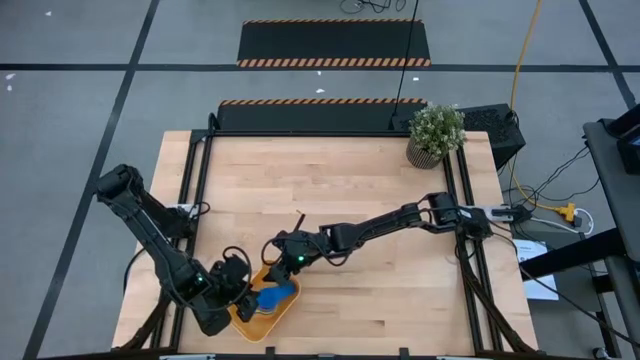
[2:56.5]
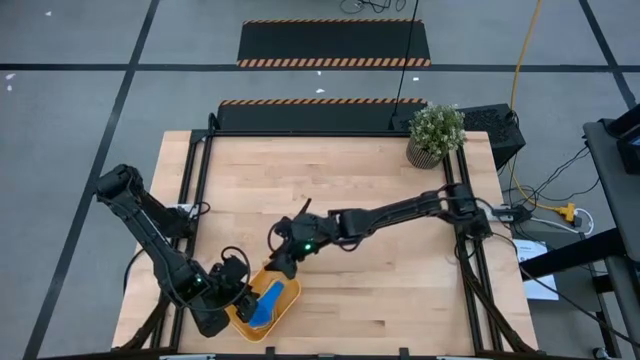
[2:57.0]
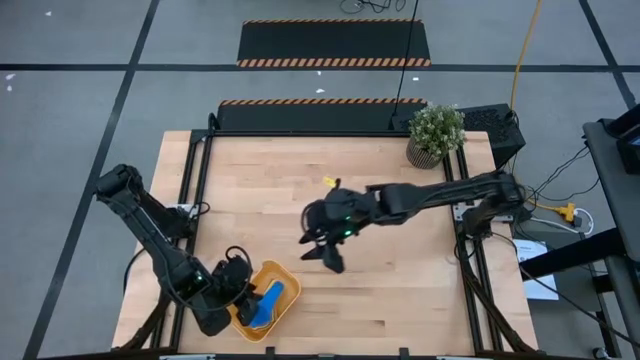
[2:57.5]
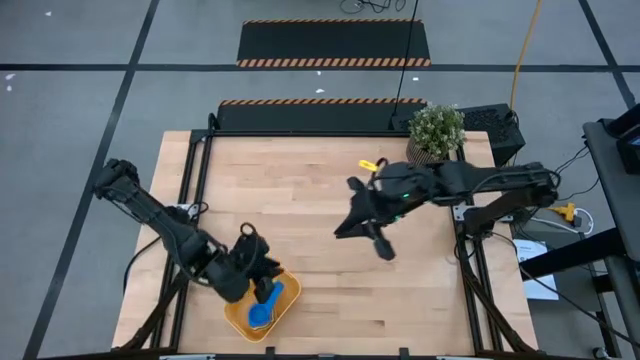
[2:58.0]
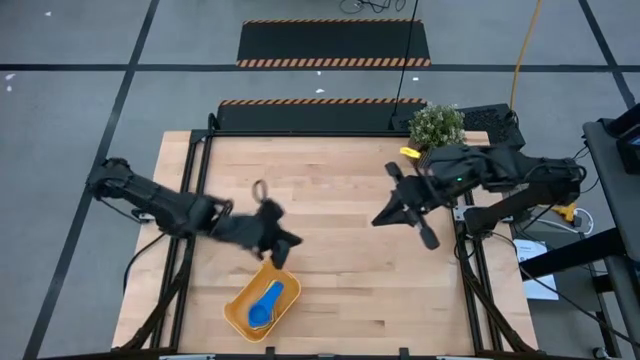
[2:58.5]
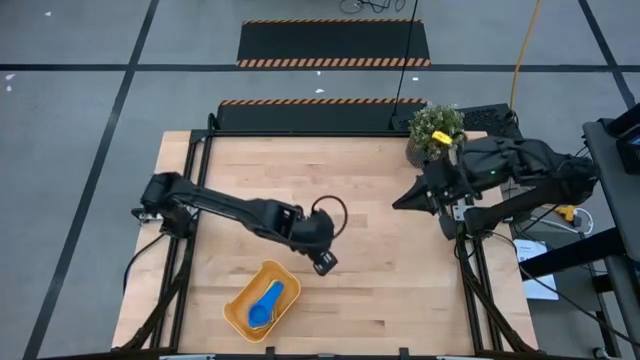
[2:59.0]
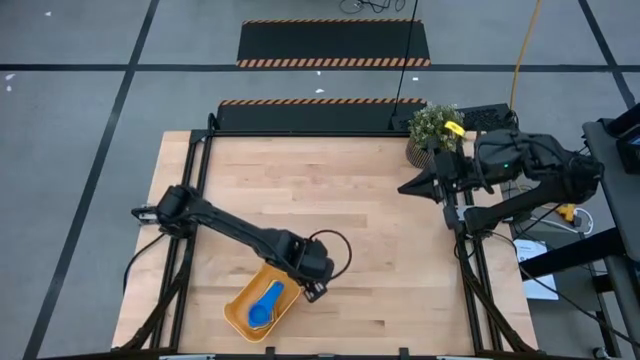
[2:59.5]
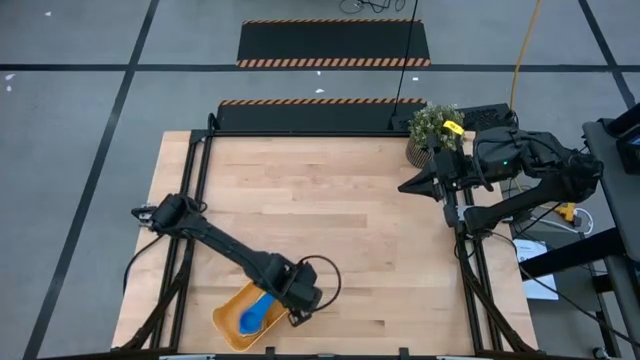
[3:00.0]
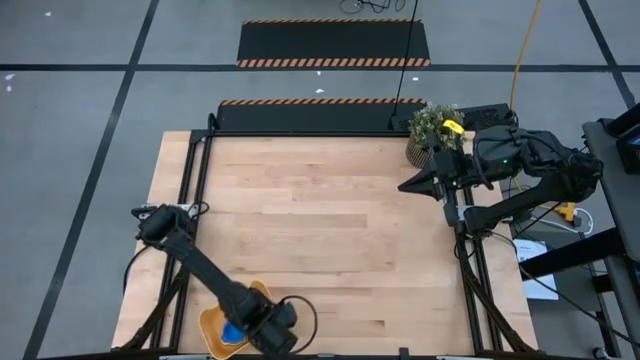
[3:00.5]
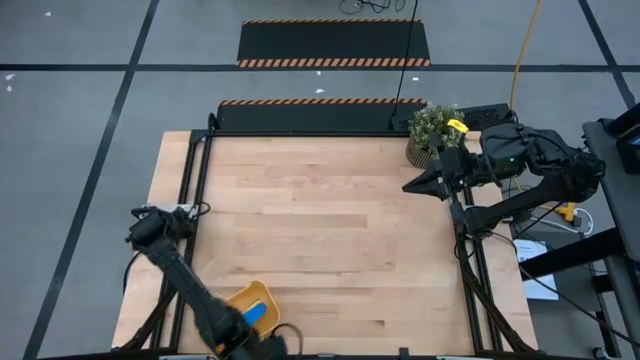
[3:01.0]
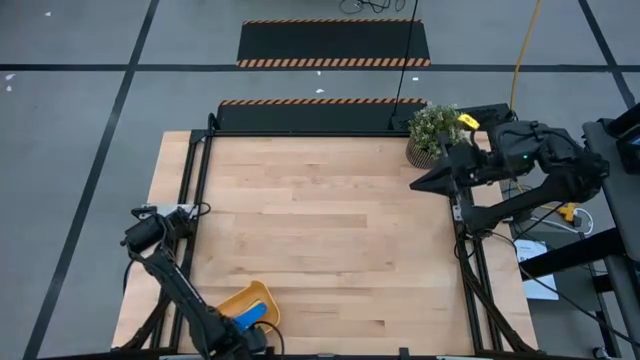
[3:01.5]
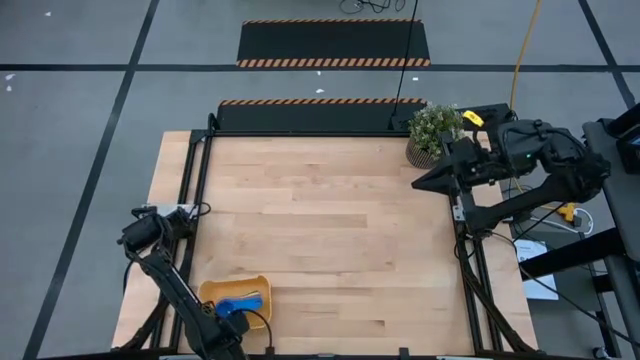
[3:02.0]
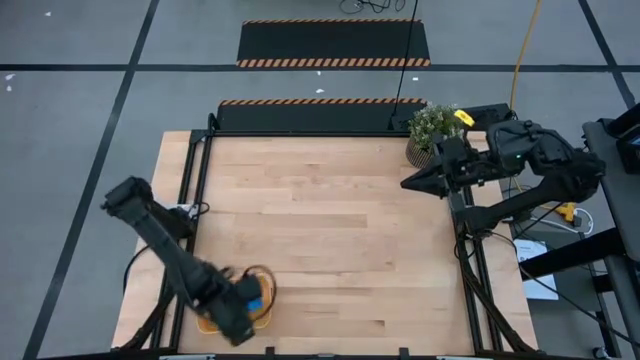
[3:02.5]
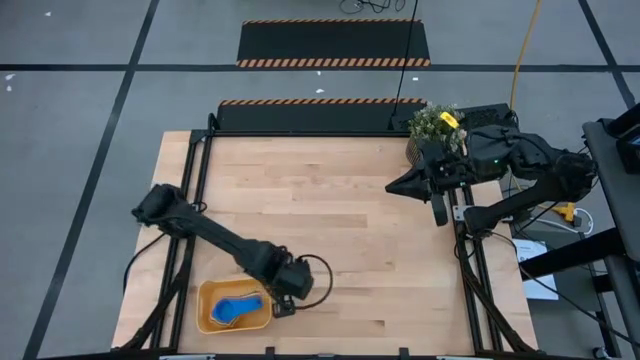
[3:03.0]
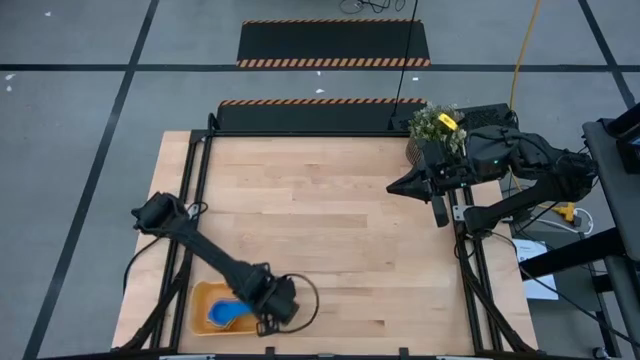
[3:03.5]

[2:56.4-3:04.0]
Task: Nest measuring cups in basket
Move the yellow bin to the bottom left of the table

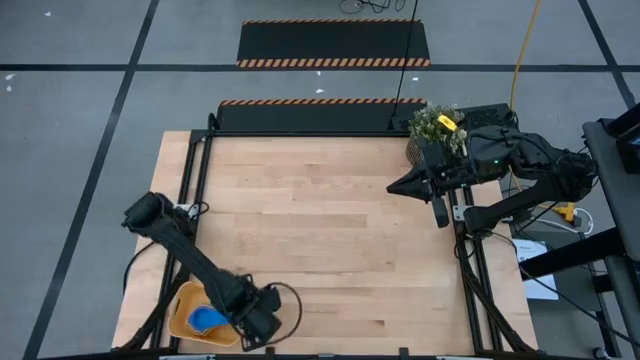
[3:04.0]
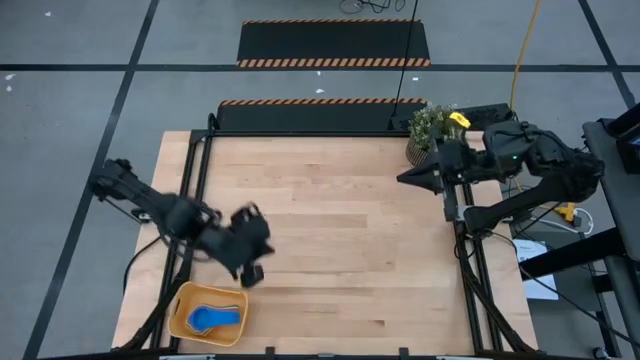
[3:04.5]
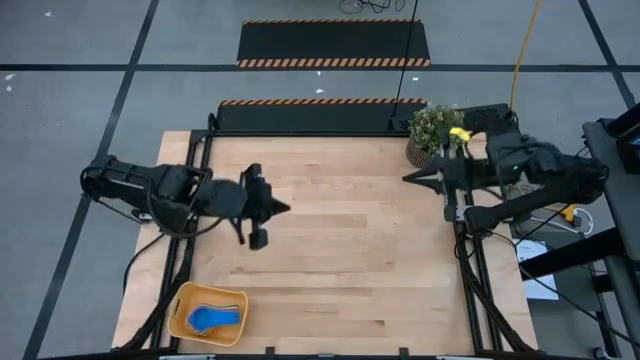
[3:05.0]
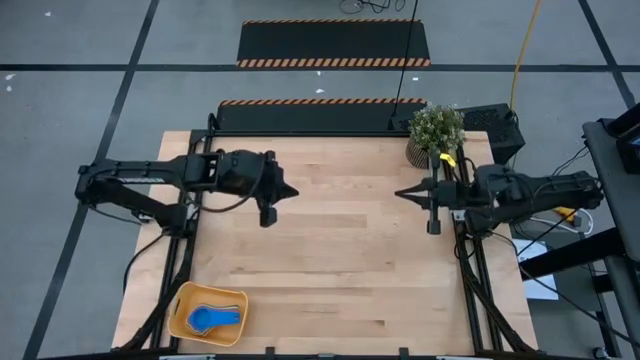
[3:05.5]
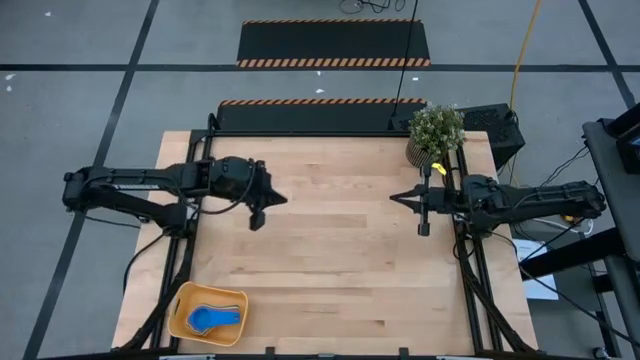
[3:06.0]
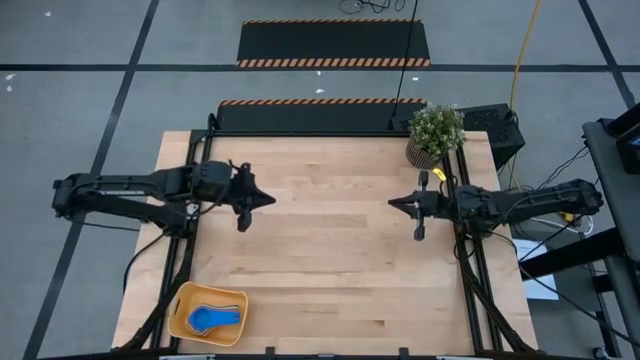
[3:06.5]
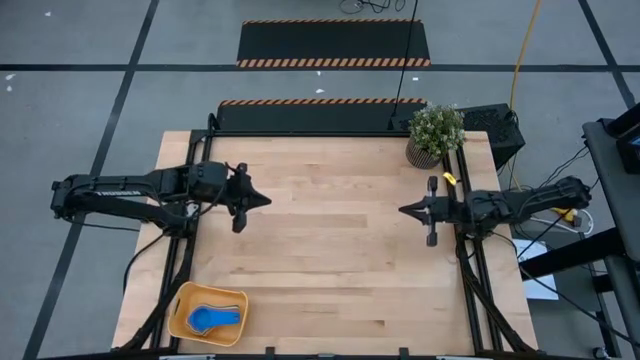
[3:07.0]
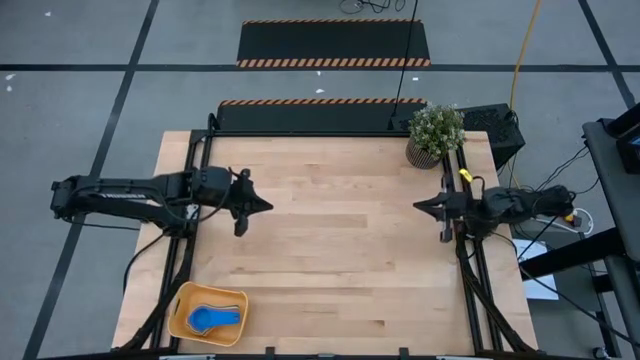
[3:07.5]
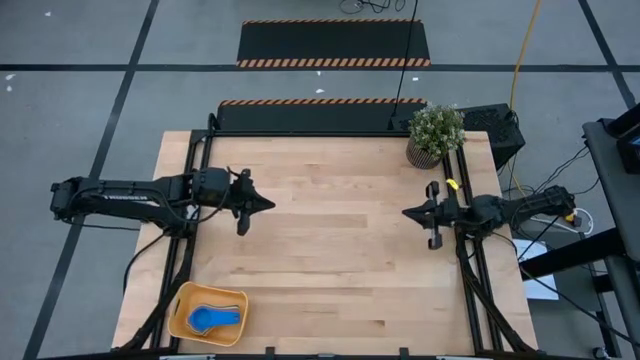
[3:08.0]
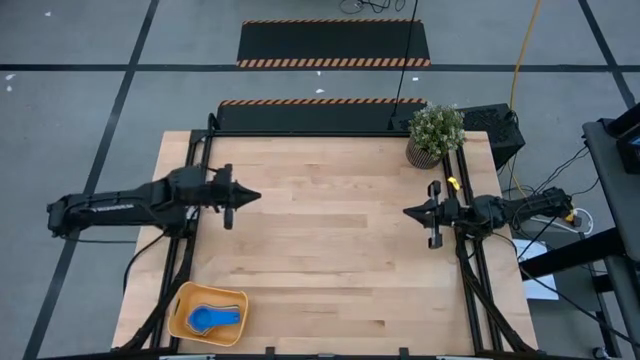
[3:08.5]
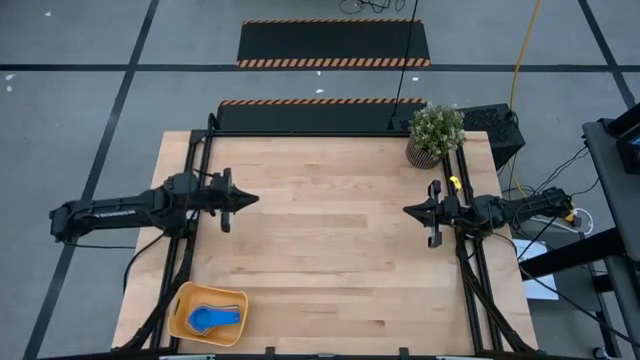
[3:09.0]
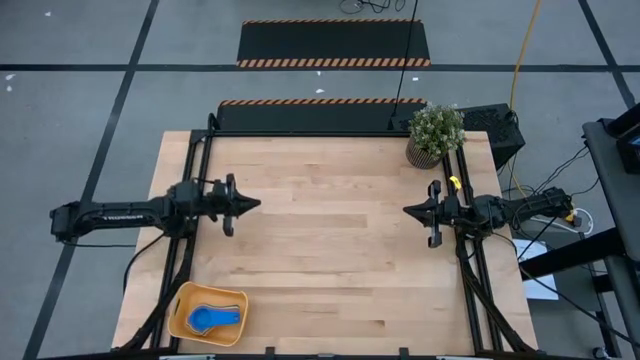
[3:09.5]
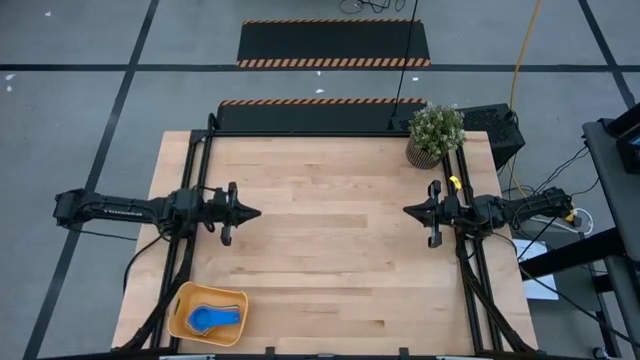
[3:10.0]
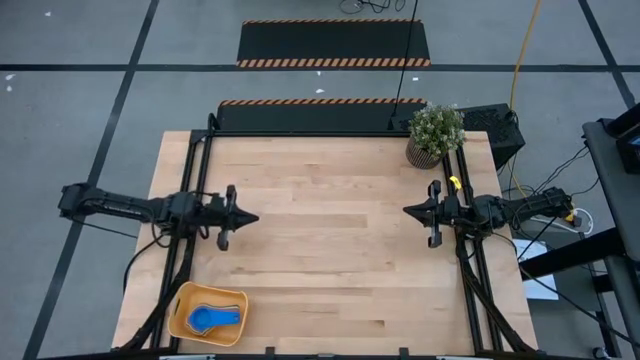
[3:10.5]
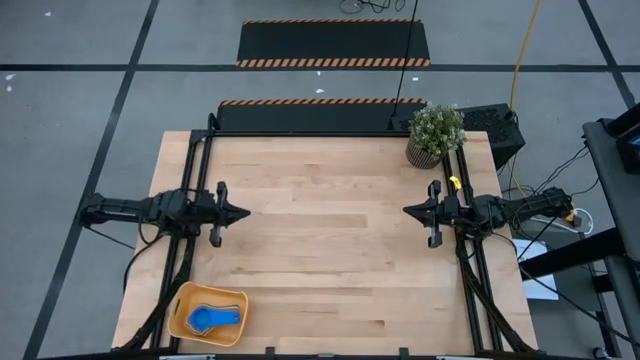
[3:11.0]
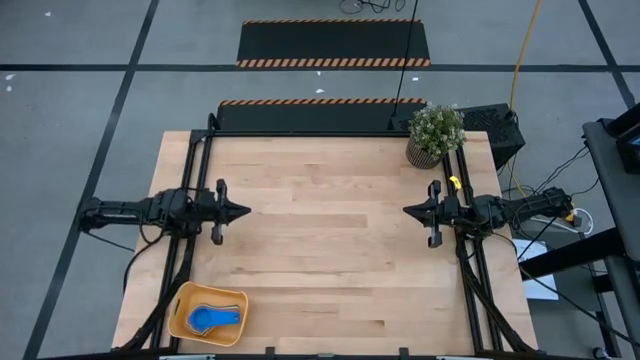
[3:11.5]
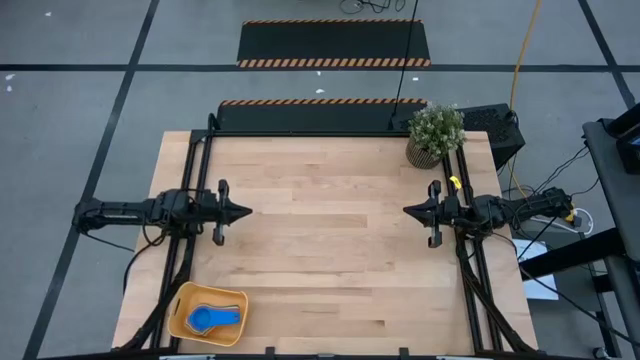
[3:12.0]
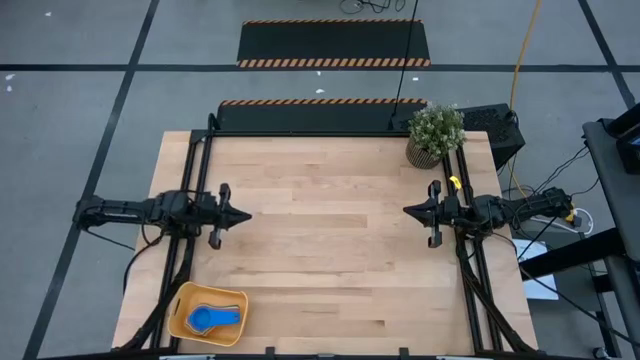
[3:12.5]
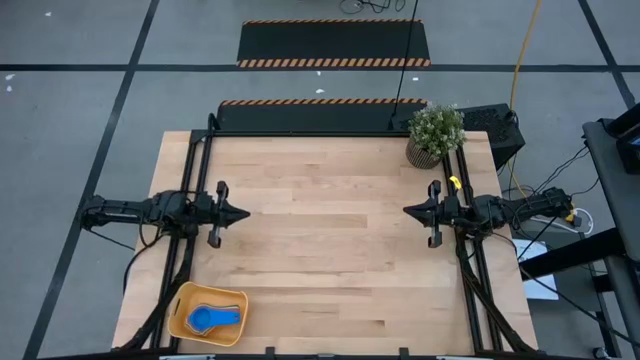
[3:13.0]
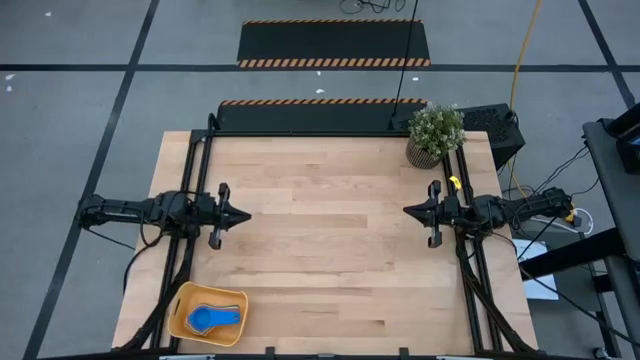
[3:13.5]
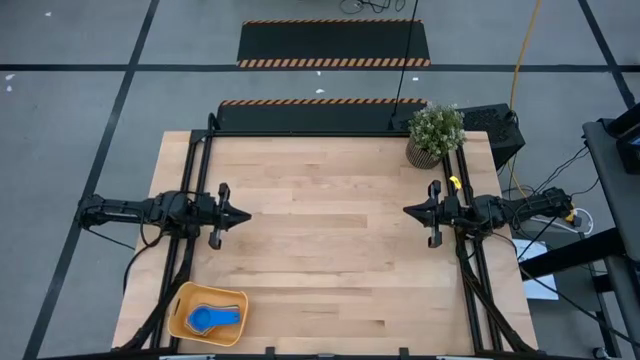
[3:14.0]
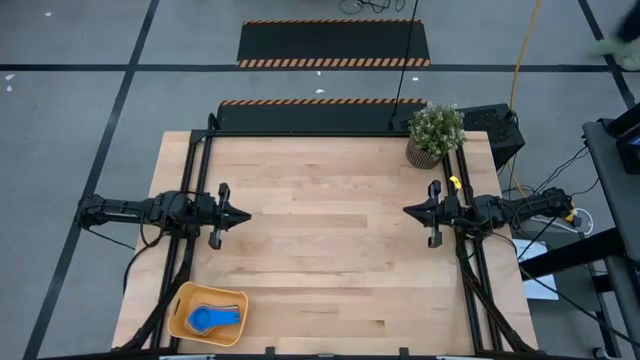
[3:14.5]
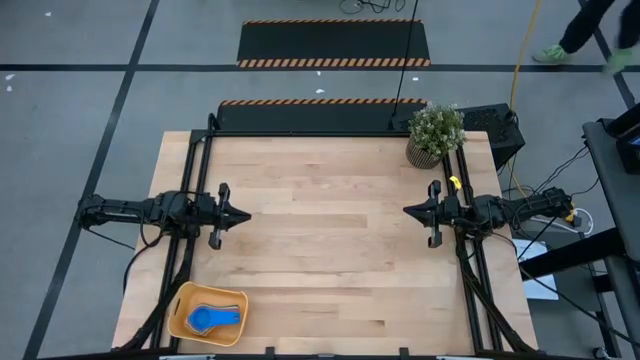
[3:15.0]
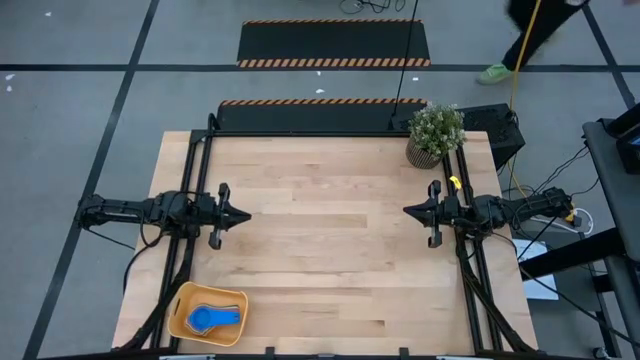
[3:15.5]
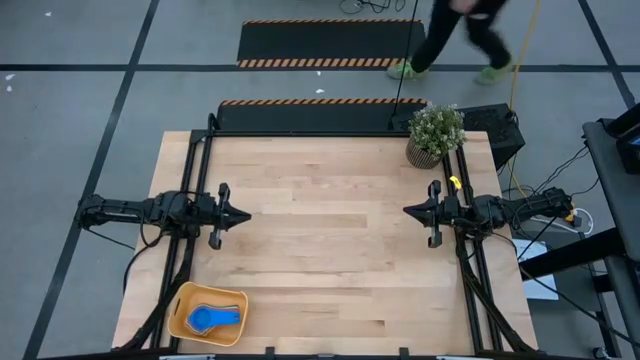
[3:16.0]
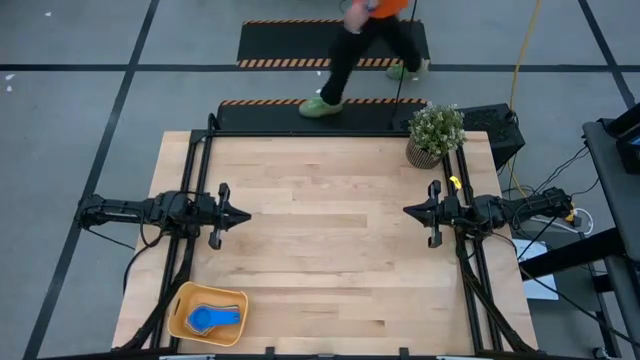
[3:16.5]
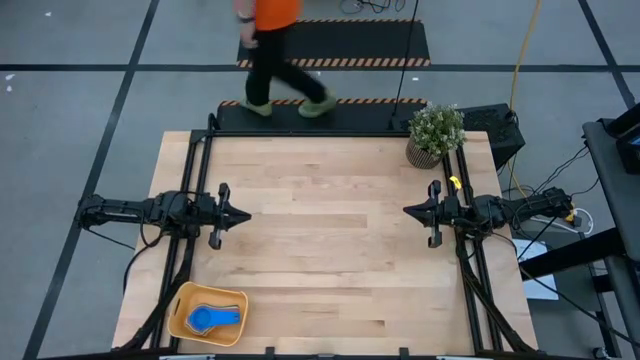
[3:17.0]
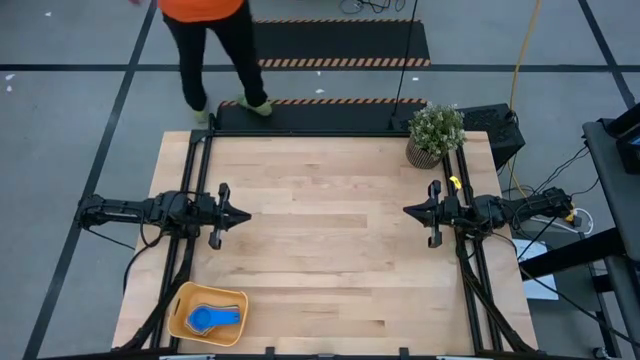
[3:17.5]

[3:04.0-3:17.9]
Return to Home Position
